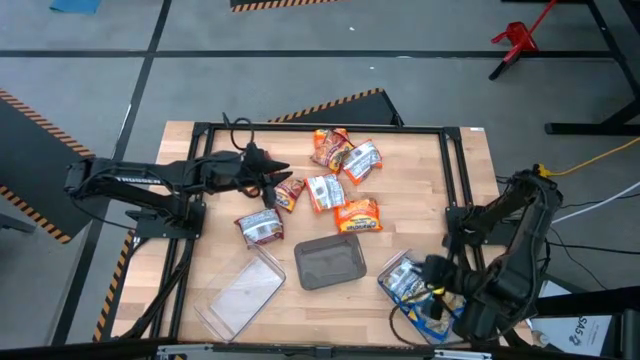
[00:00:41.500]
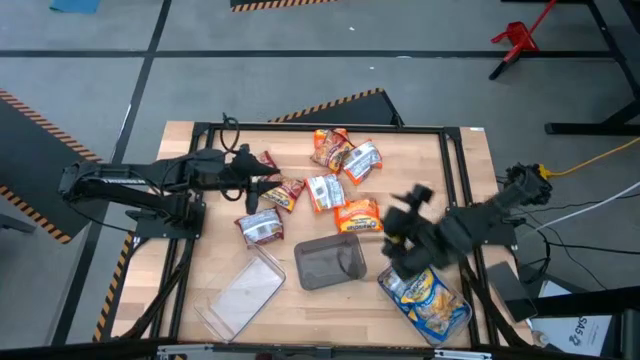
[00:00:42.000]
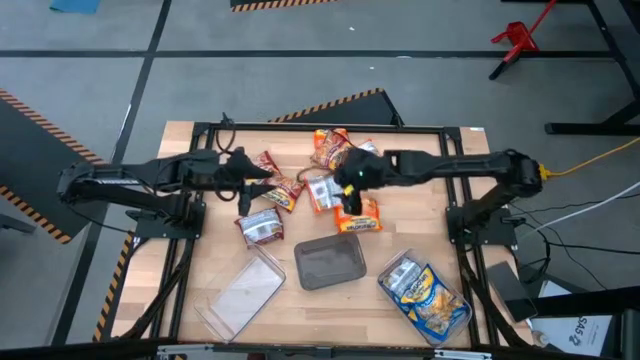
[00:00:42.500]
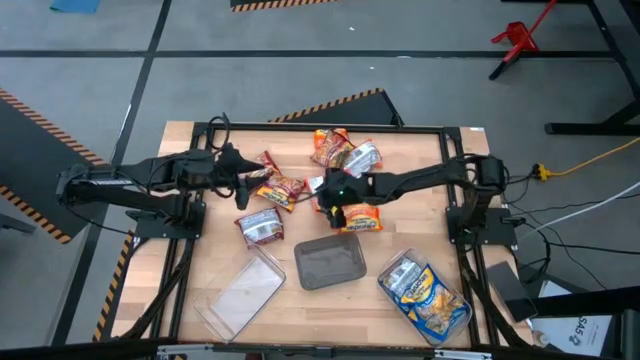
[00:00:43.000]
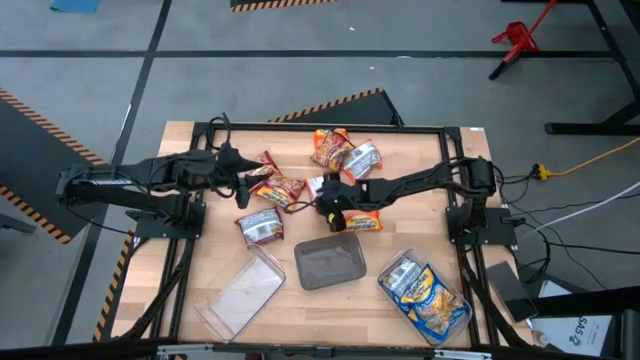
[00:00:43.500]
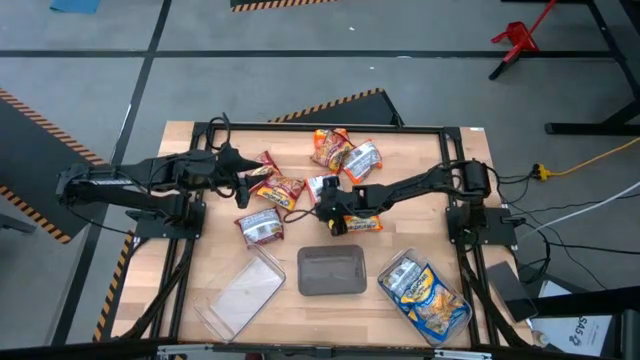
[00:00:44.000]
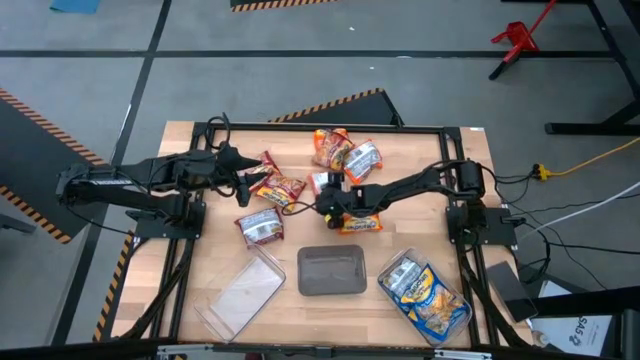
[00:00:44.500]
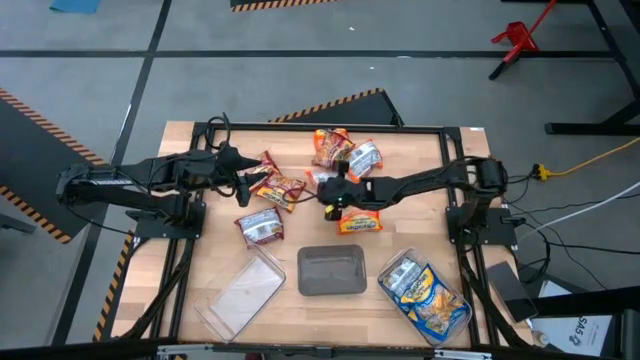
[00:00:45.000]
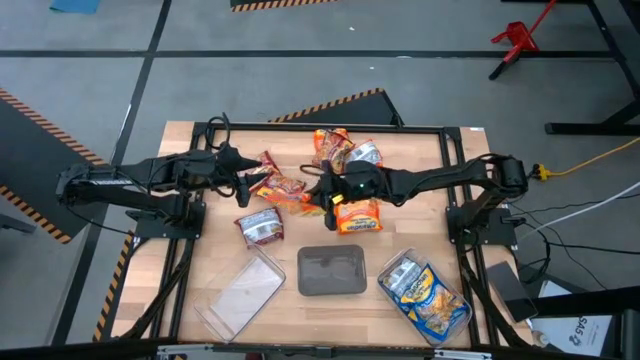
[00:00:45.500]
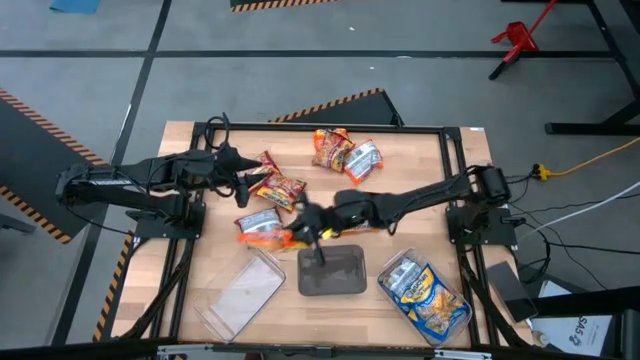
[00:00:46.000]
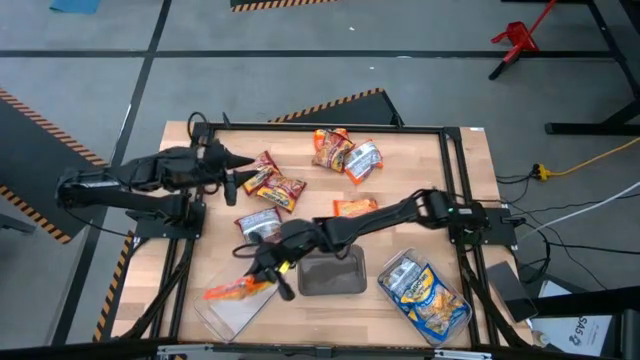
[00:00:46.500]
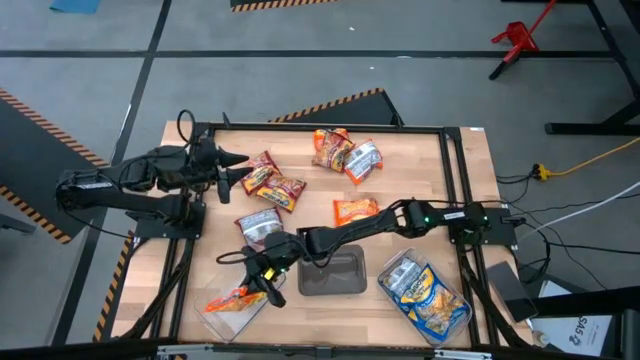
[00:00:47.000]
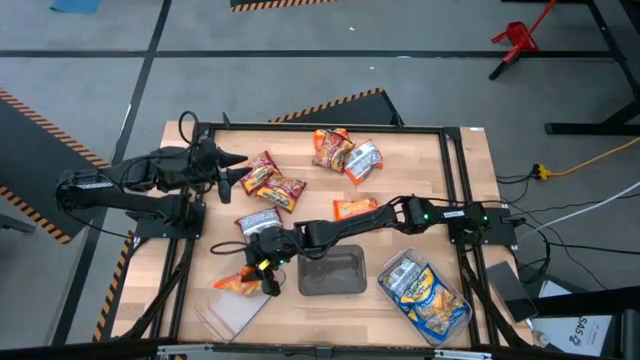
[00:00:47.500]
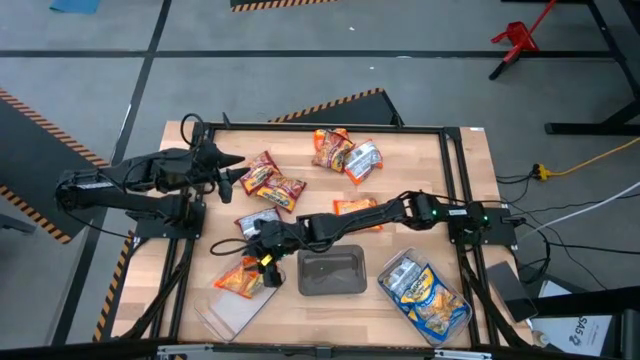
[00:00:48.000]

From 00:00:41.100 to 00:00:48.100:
Task: Sort Maruchan noodles
Put the orange noodle pack into the left transparent bin

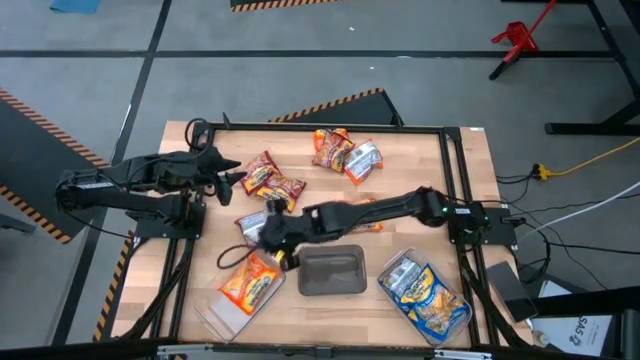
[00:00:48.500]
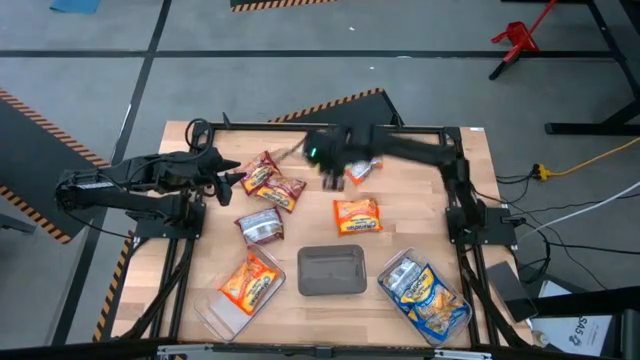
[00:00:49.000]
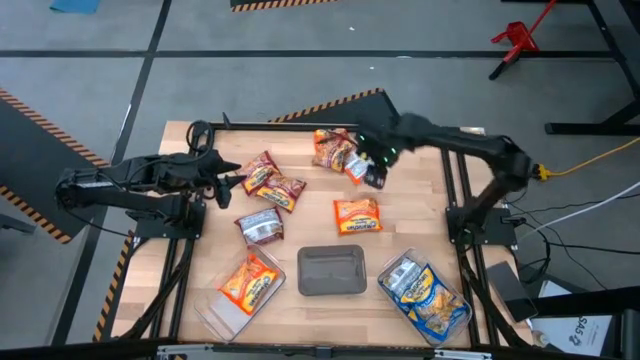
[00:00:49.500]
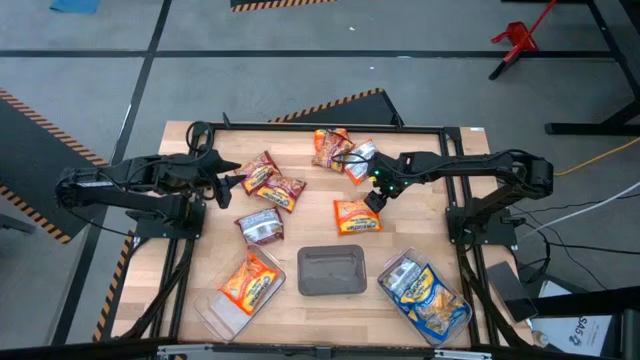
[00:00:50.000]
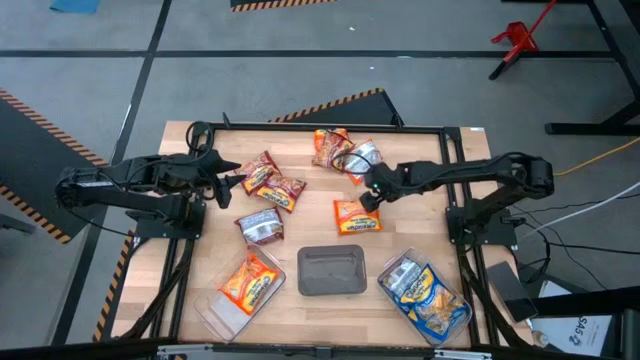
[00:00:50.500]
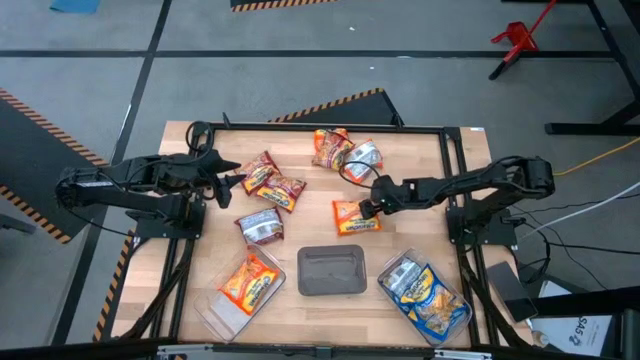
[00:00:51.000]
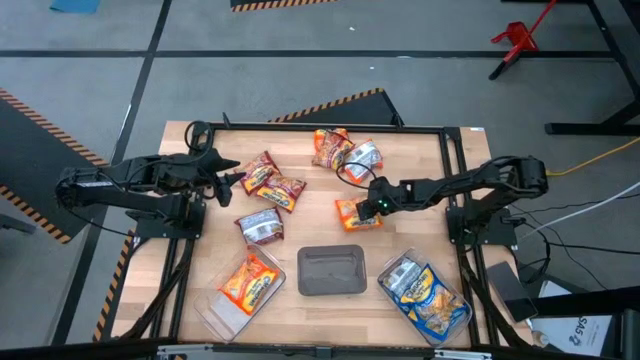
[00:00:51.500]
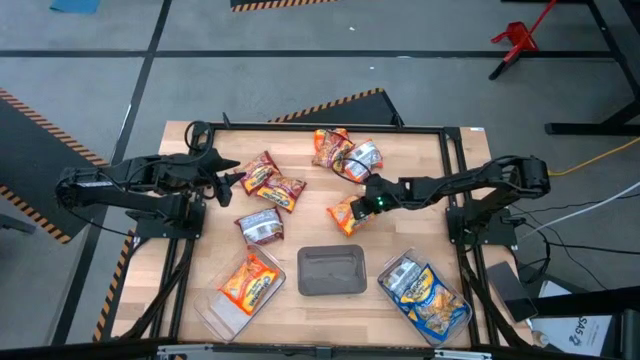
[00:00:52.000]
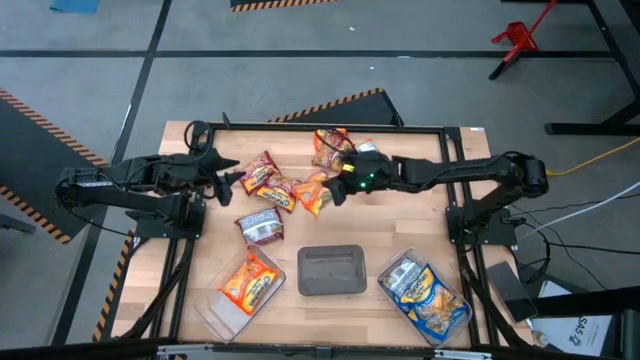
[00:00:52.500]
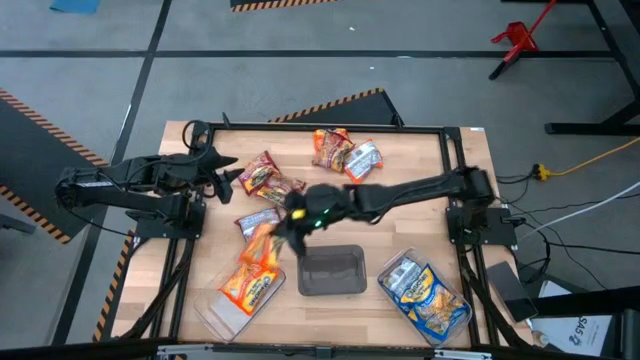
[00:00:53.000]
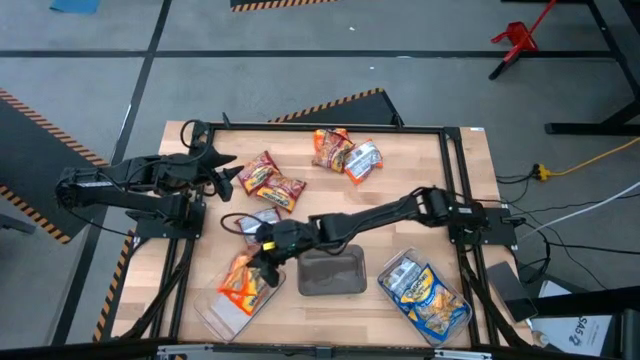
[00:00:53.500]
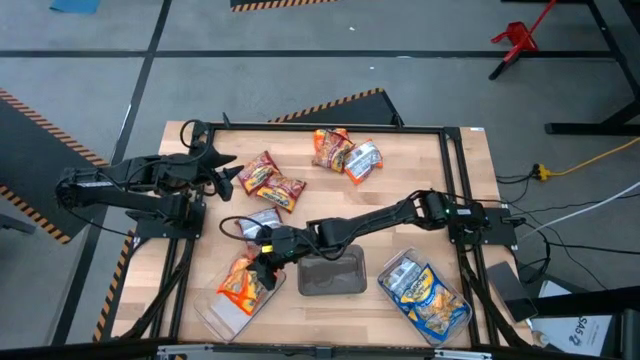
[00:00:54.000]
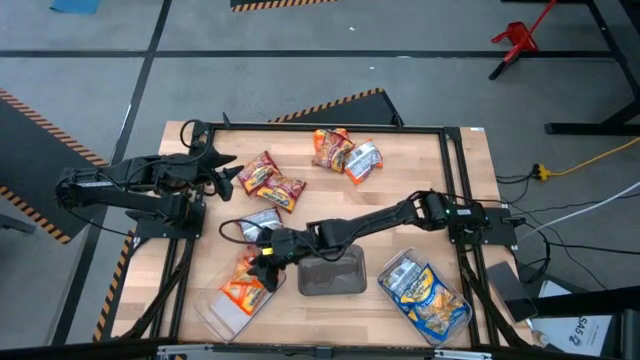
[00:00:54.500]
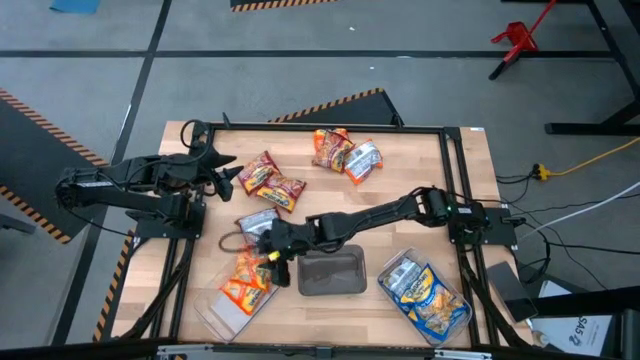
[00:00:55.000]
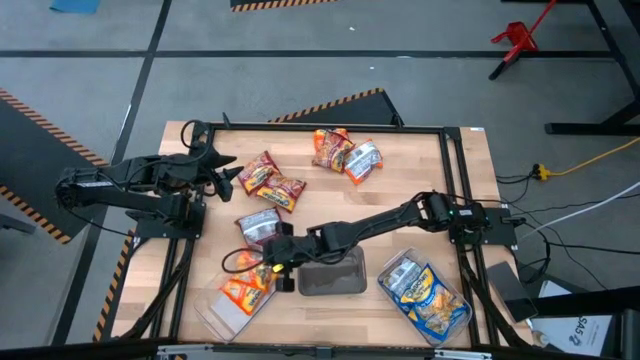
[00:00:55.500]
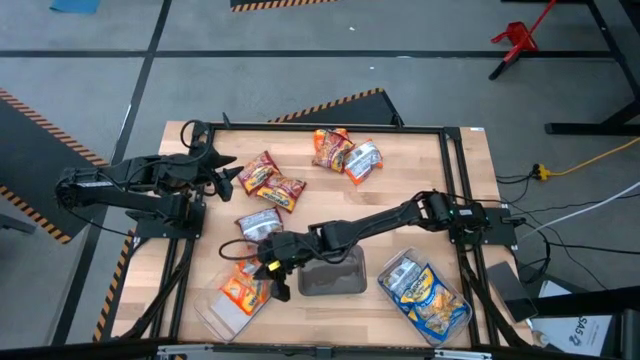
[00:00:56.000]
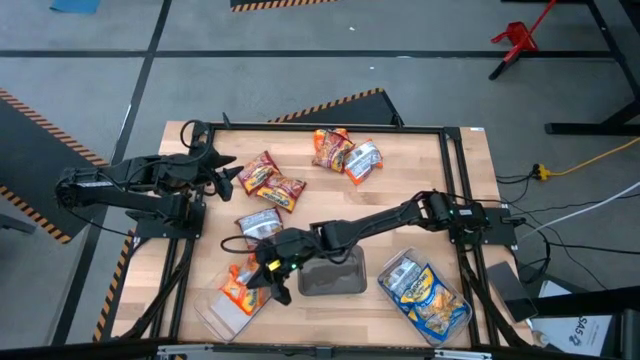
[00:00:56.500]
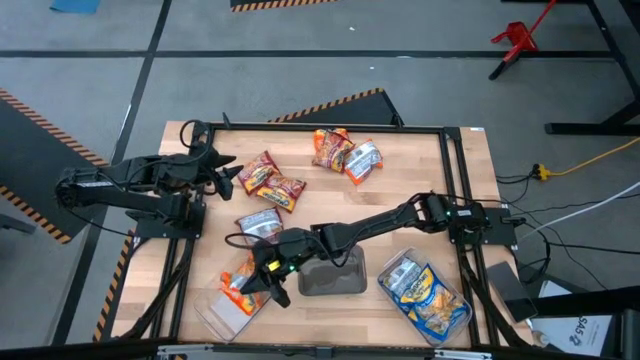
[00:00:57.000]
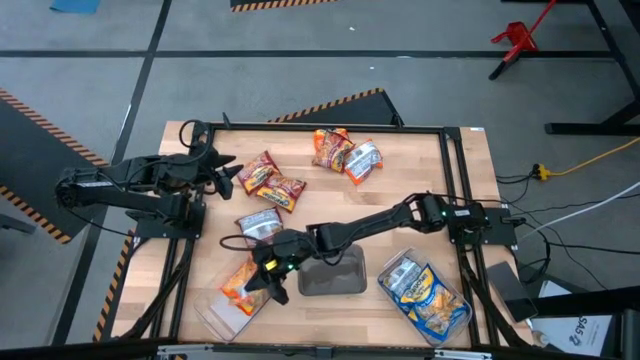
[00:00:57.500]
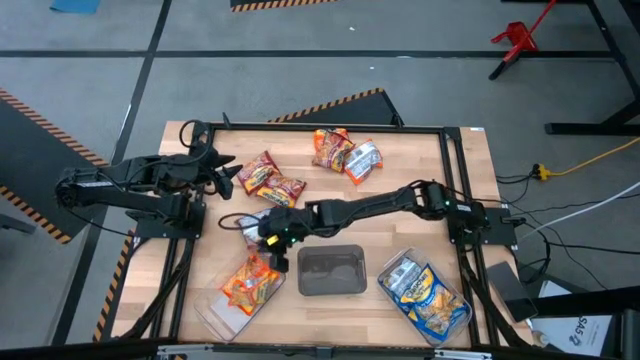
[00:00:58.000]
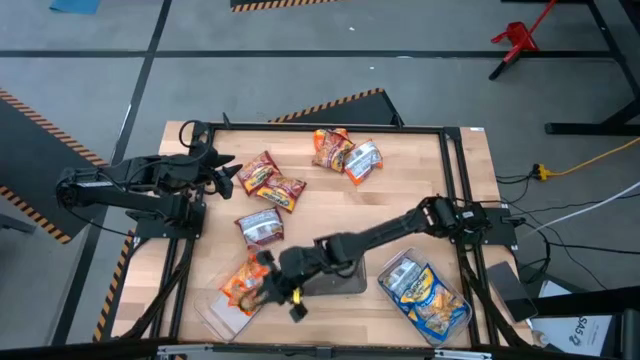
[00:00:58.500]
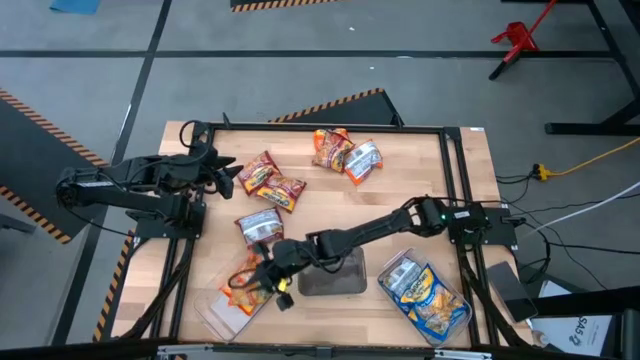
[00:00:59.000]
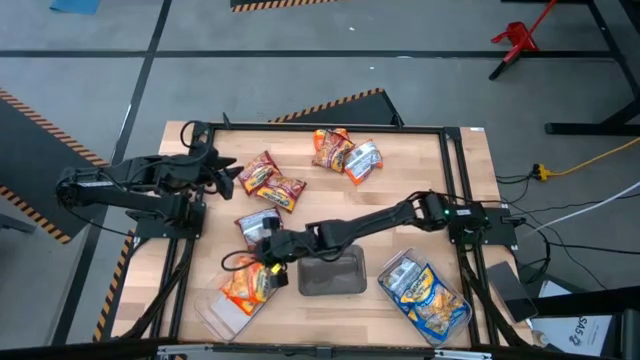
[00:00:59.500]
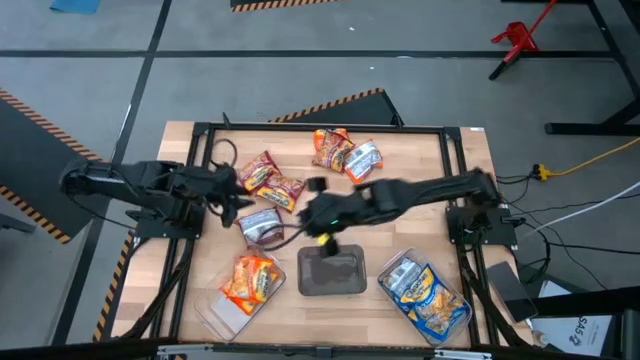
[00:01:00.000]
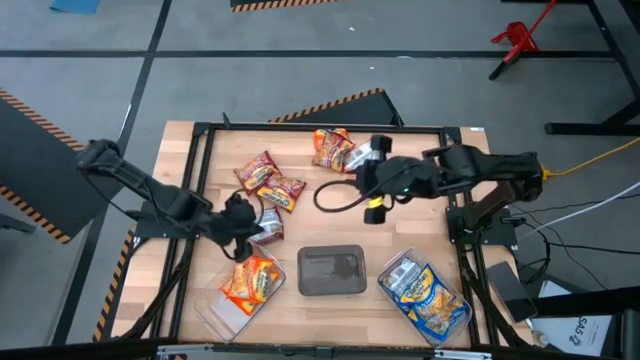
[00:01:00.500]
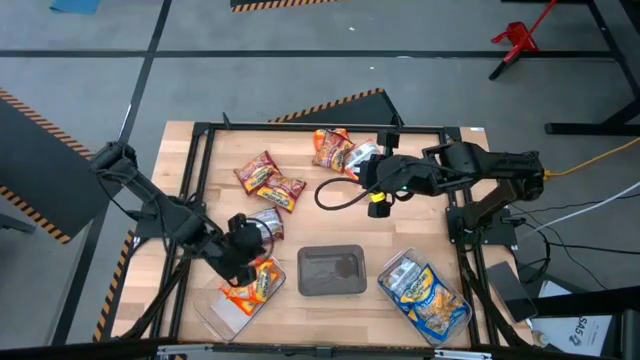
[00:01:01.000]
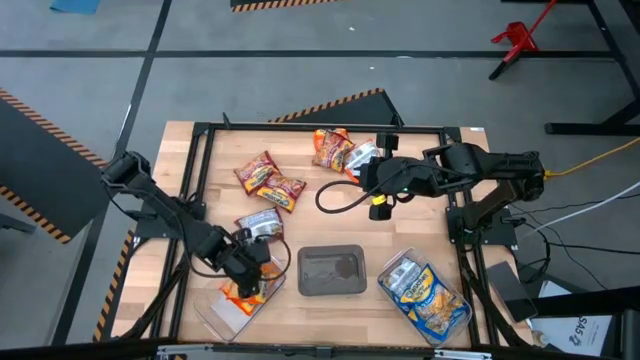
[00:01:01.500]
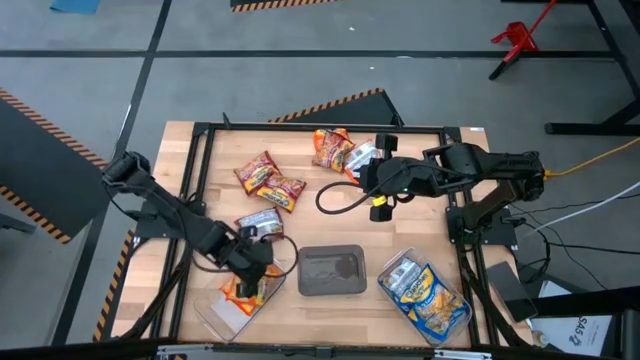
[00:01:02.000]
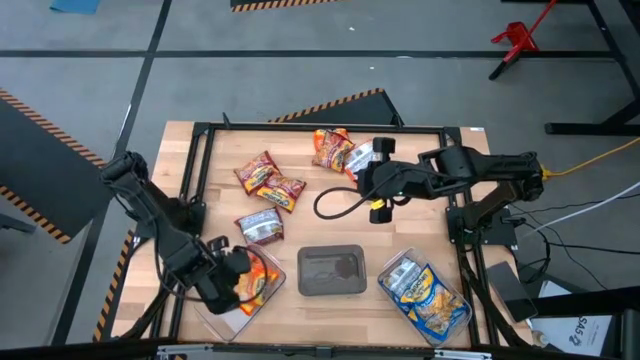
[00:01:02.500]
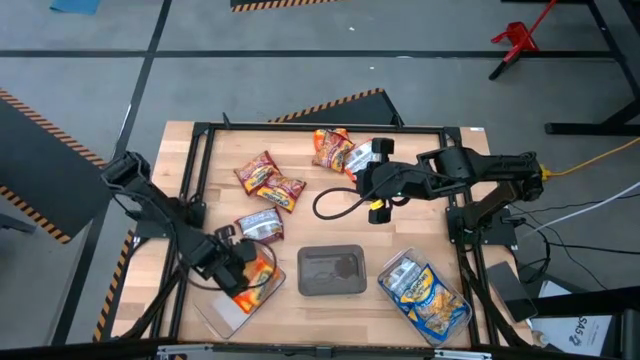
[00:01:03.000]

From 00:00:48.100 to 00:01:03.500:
Put the orange noodle pack into the left transparent bin
